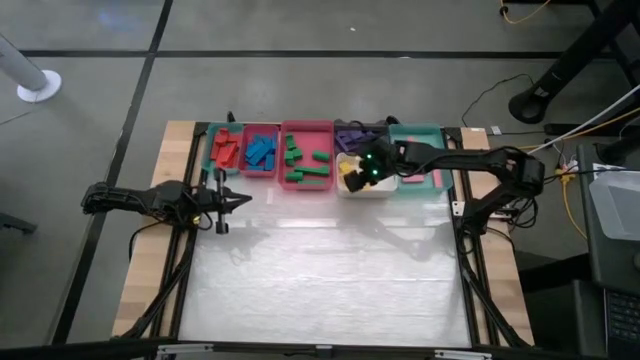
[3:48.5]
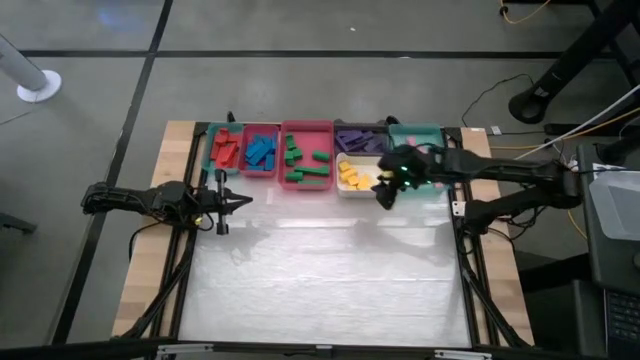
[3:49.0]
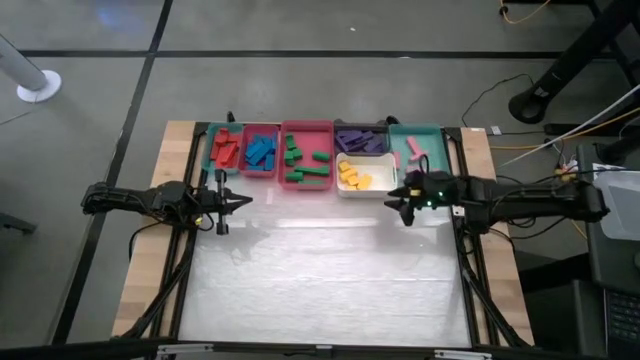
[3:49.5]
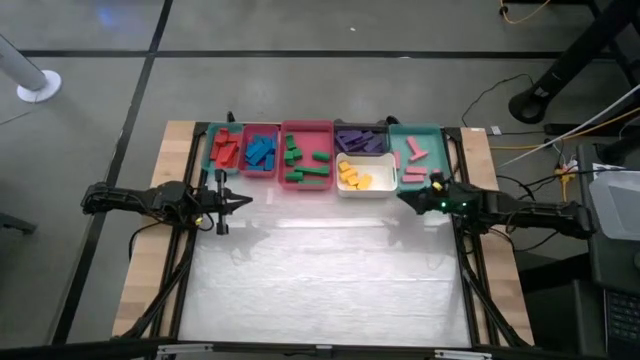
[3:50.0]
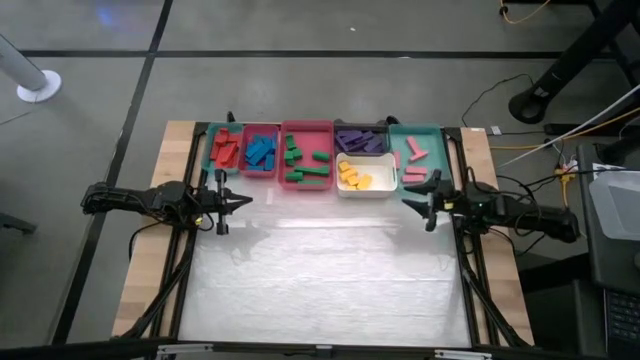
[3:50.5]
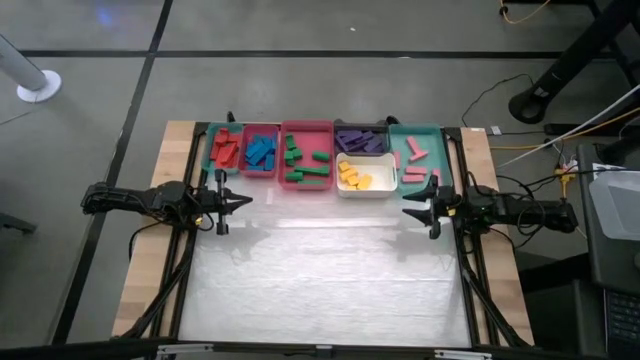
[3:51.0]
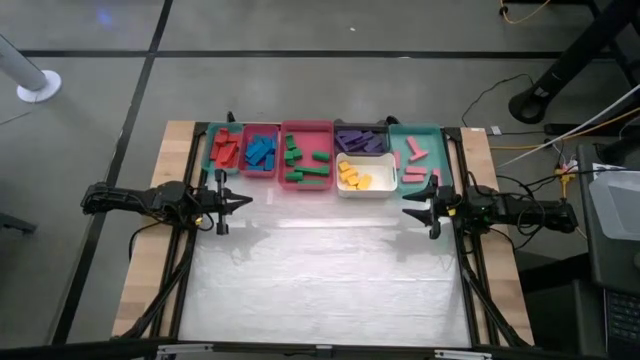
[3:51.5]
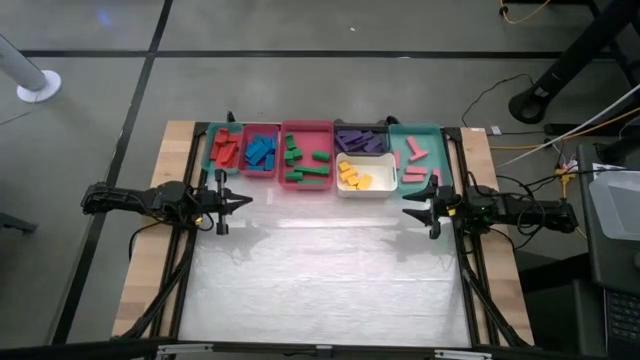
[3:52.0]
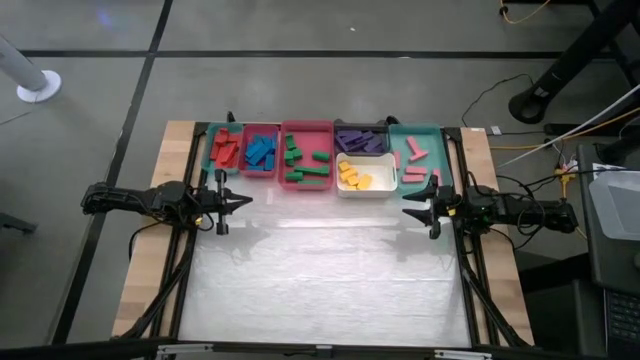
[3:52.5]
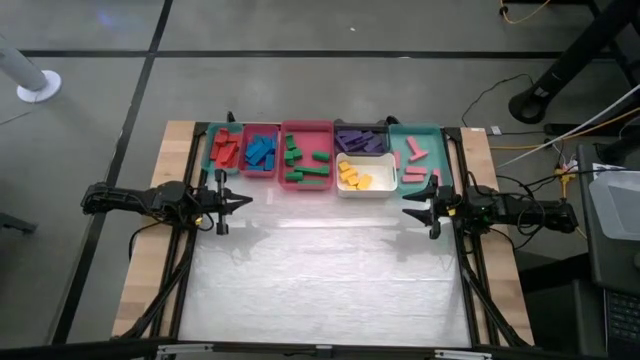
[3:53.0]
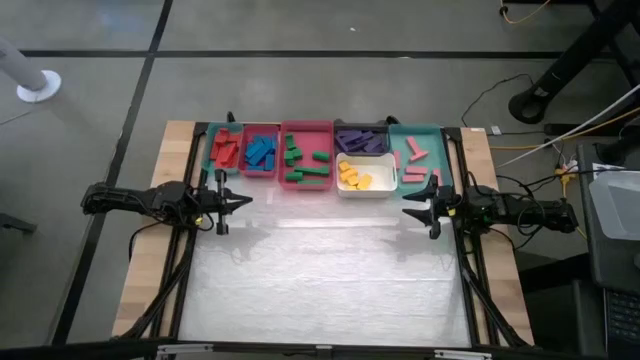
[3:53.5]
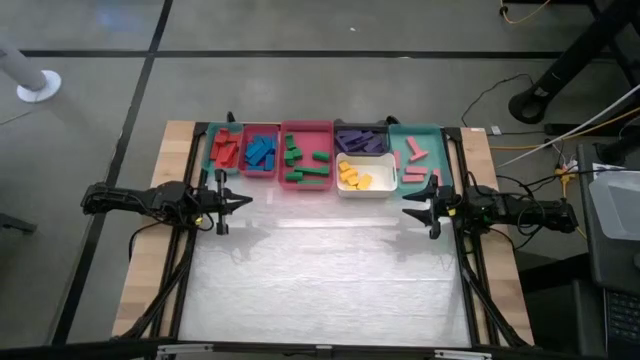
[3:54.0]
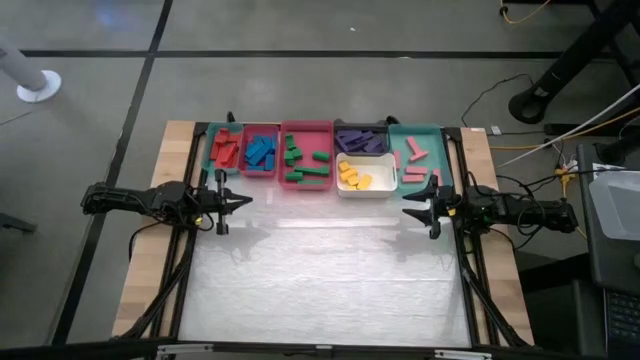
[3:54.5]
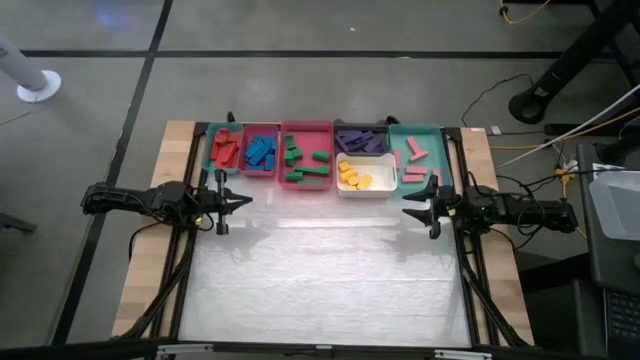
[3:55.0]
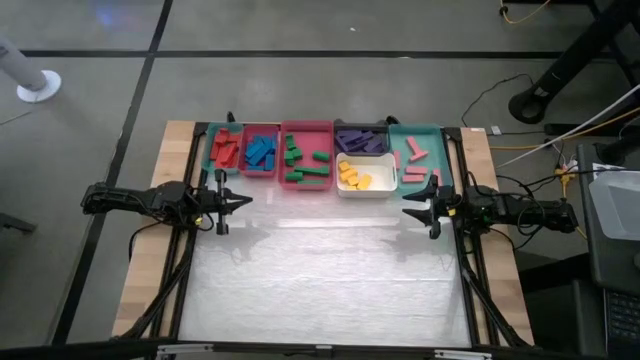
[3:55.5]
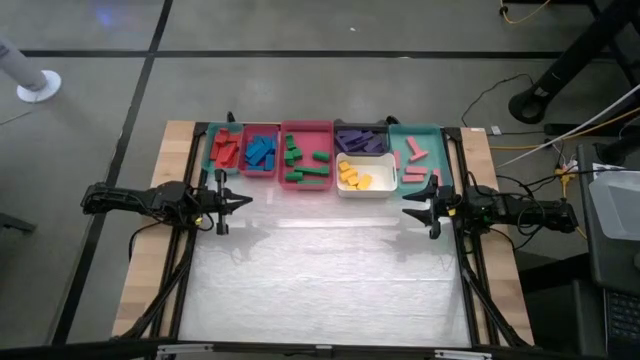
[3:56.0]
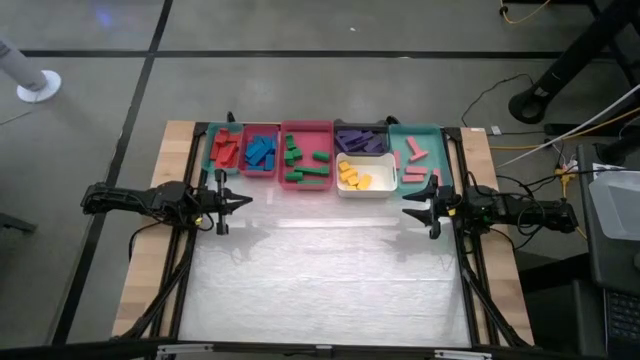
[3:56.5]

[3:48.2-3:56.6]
Task: Sort blocks
Return to Home Position

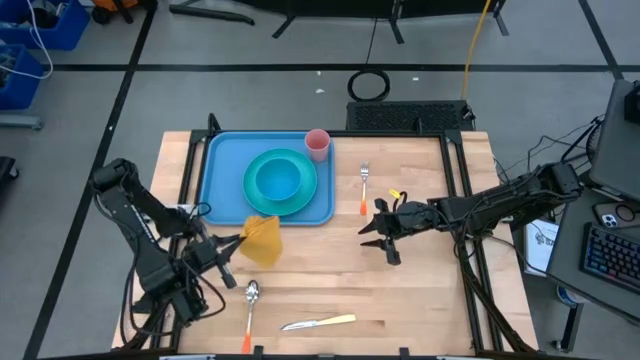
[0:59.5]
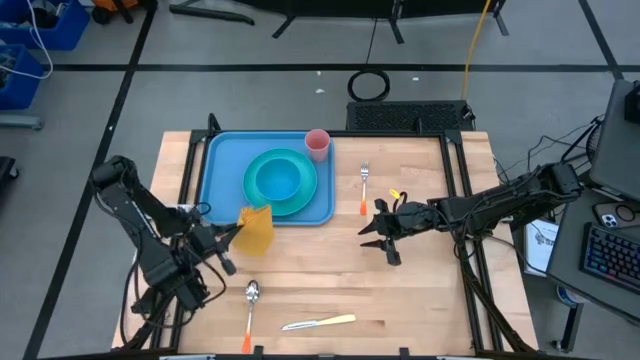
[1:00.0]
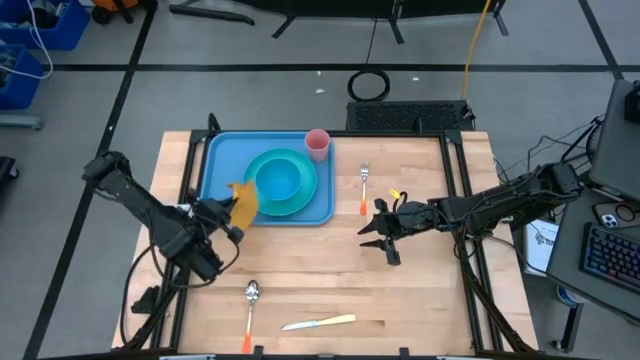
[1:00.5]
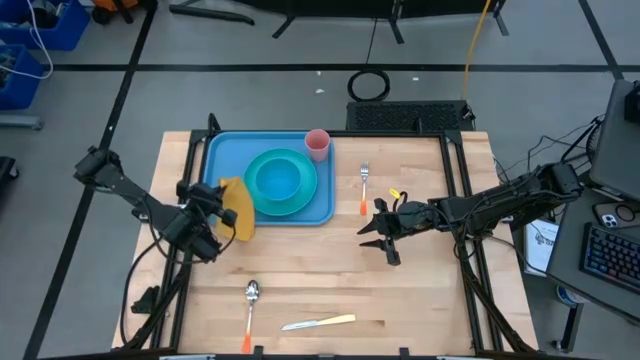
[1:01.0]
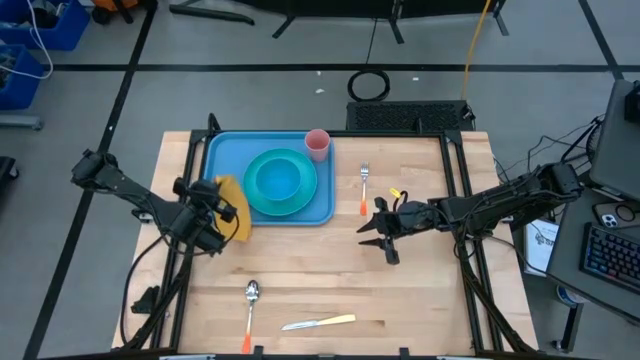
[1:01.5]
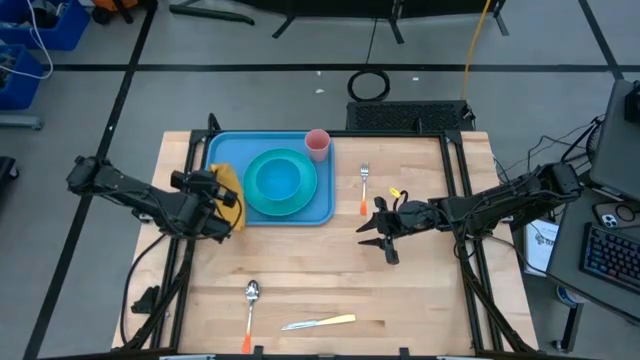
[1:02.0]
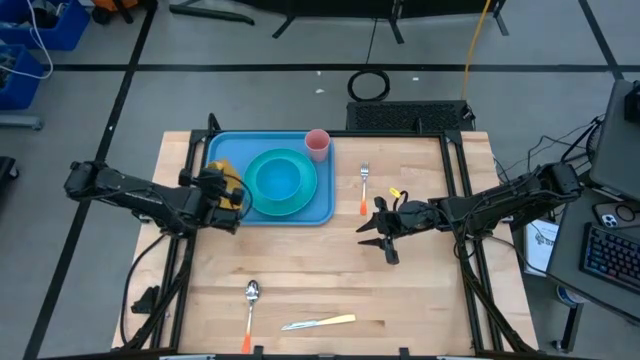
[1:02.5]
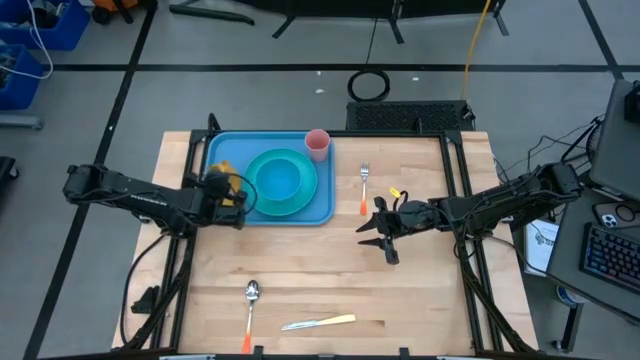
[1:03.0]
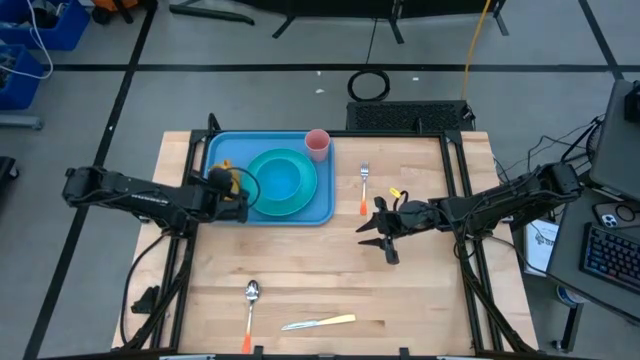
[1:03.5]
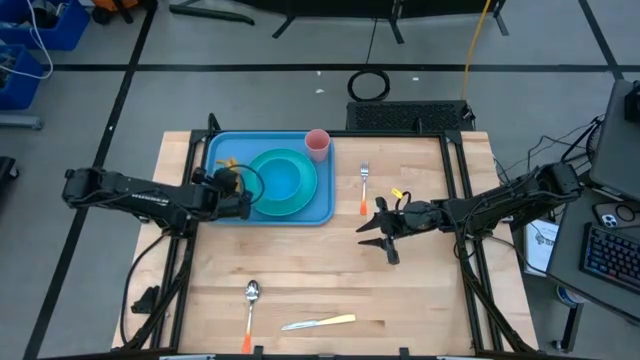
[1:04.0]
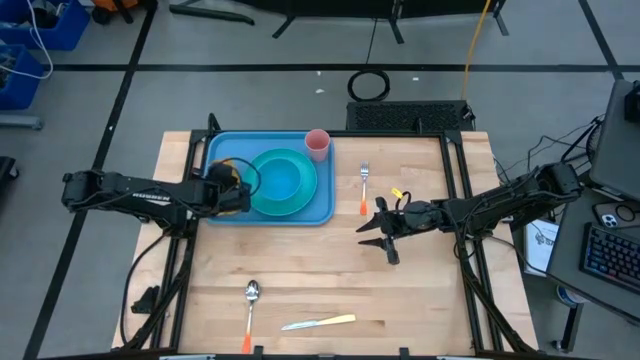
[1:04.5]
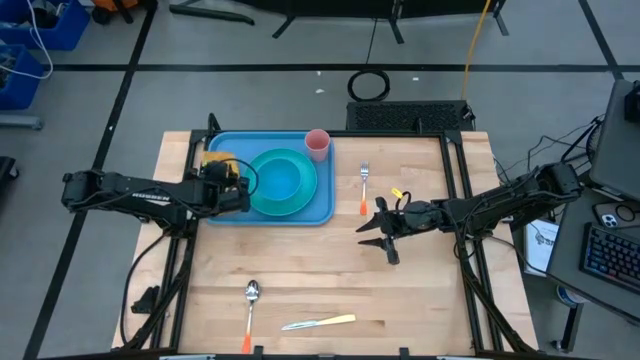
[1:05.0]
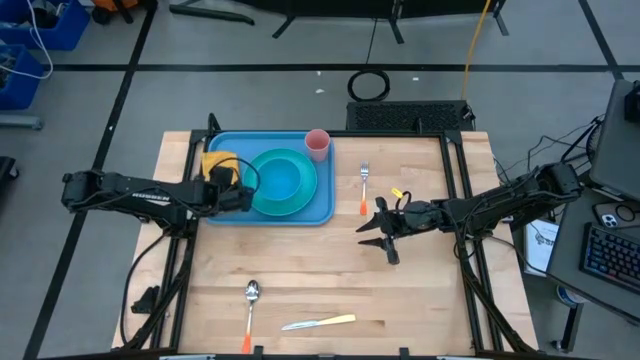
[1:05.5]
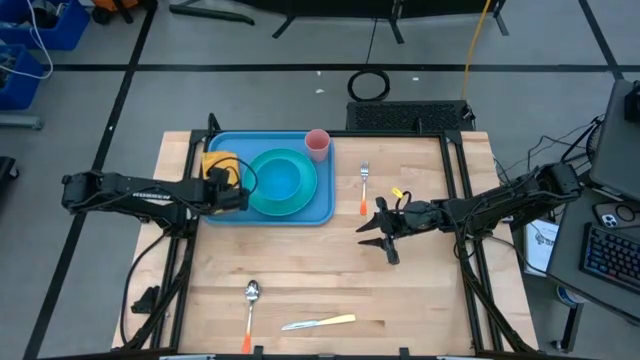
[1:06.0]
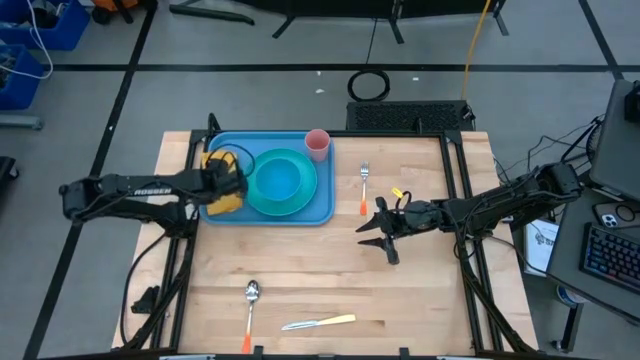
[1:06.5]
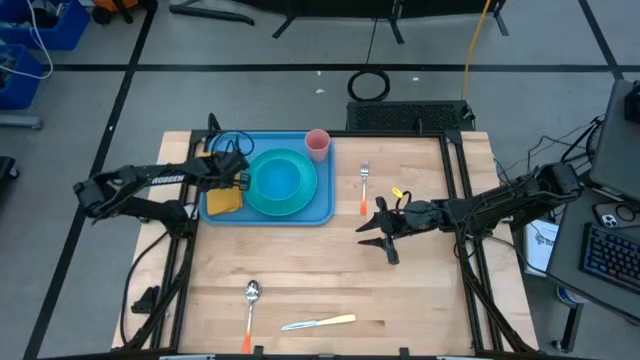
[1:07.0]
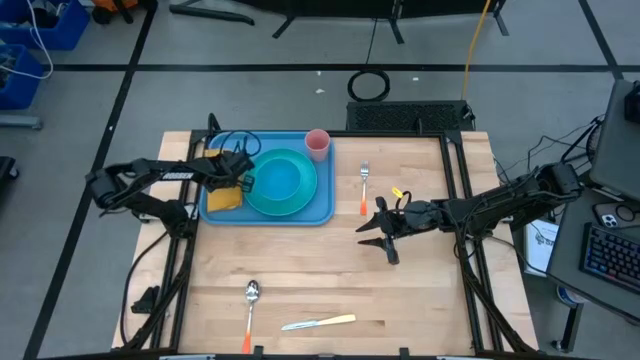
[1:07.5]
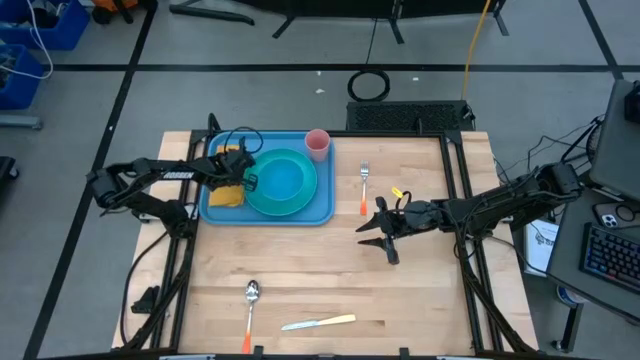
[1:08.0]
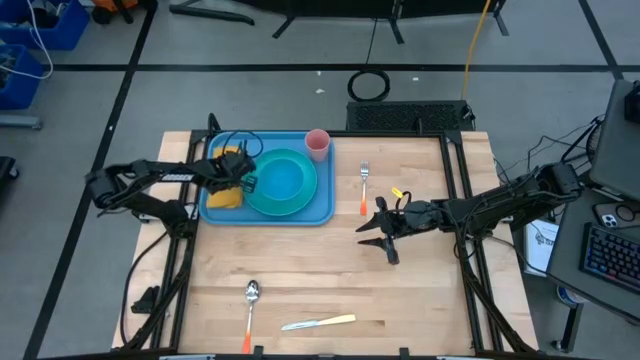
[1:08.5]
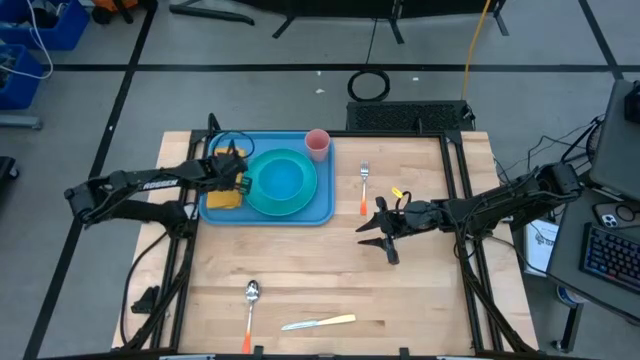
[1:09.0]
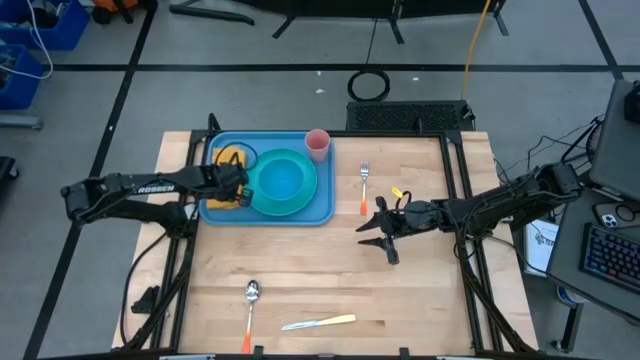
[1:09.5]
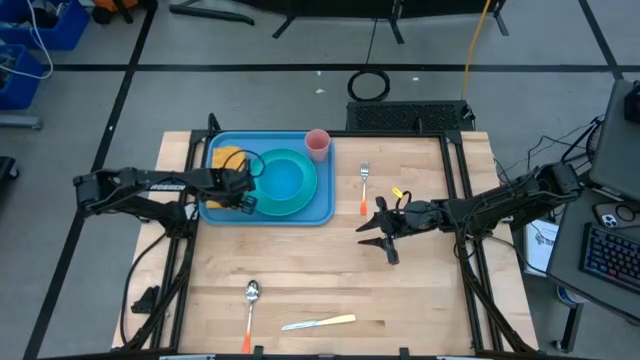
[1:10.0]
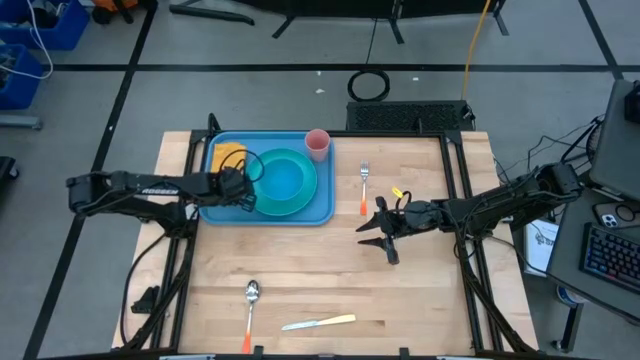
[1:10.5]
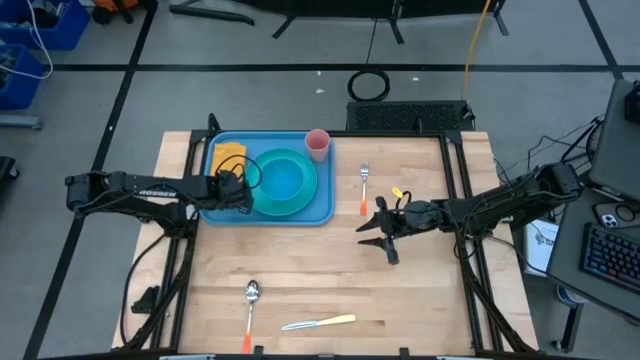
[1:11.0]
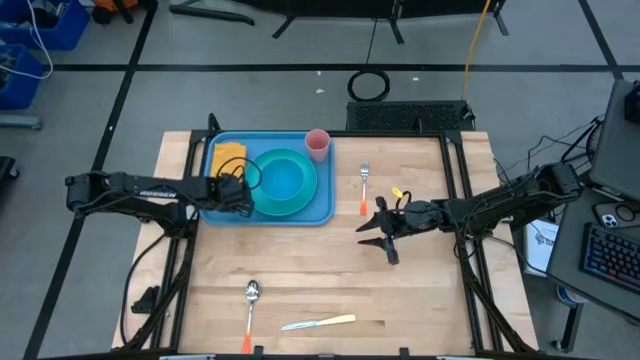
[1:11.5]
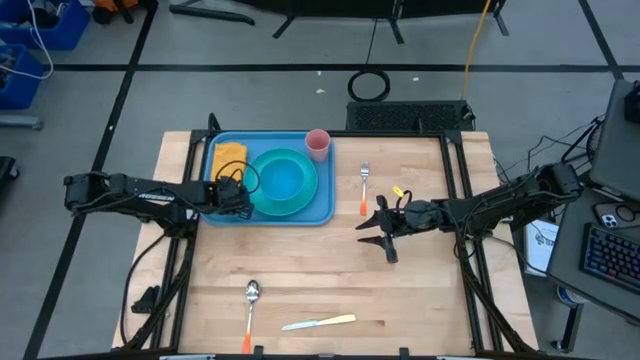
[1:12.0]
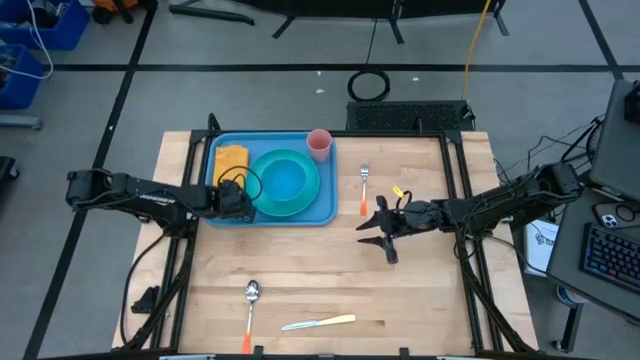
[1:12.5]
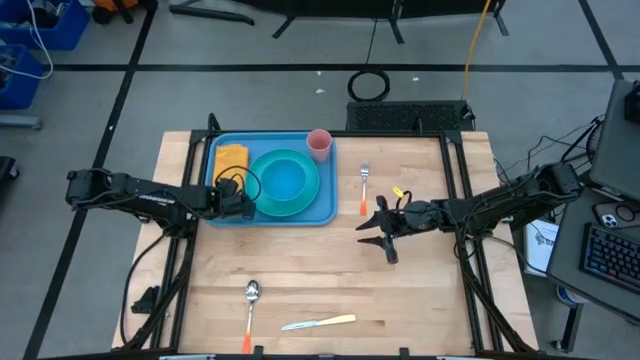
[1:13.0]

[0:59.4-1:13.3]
Task: Set up tray
Put the yellow napkin to the left of the green plate on the blue serving tray
